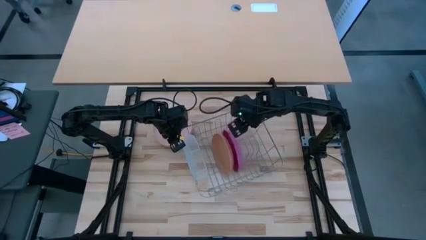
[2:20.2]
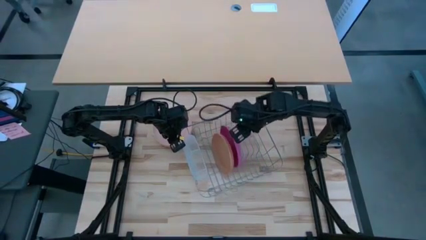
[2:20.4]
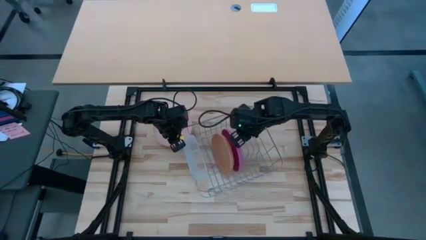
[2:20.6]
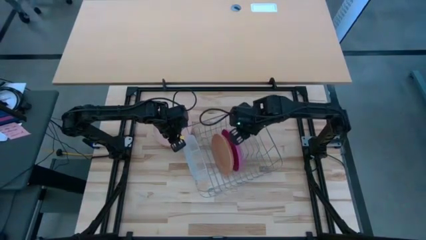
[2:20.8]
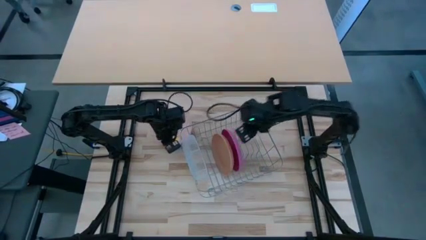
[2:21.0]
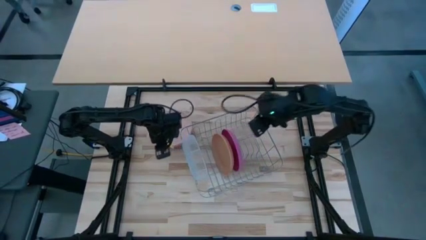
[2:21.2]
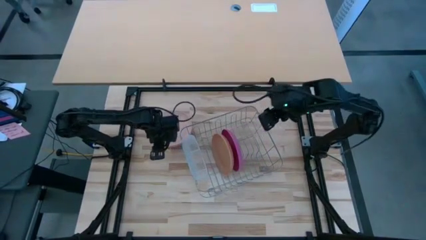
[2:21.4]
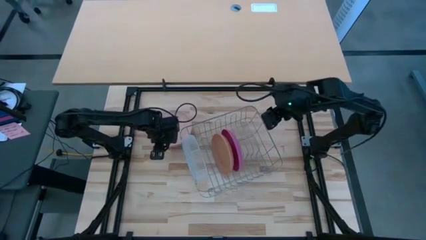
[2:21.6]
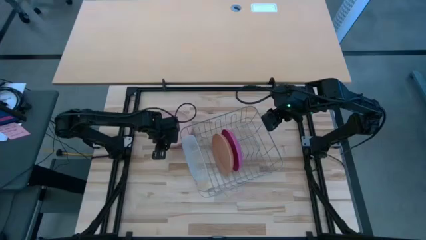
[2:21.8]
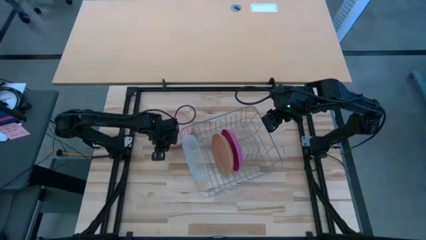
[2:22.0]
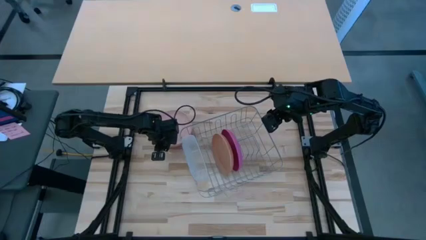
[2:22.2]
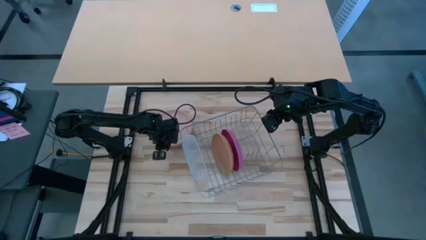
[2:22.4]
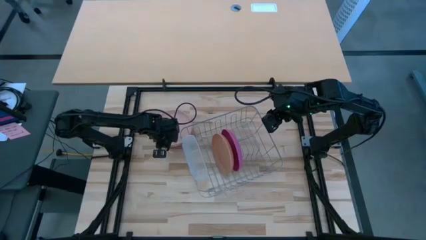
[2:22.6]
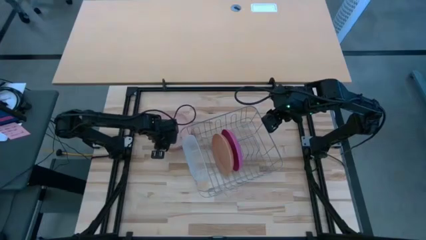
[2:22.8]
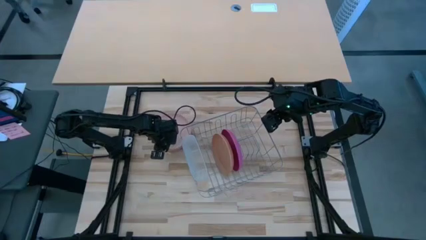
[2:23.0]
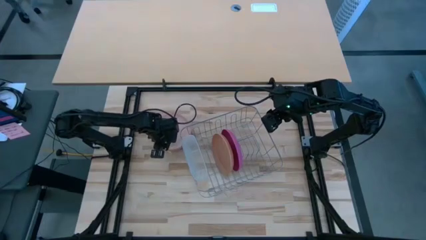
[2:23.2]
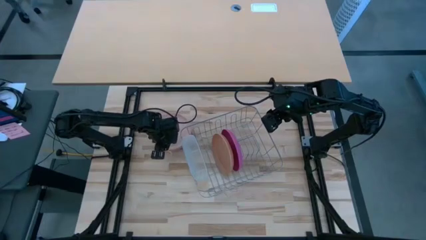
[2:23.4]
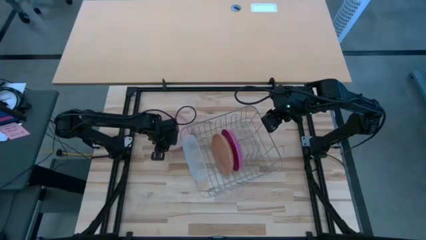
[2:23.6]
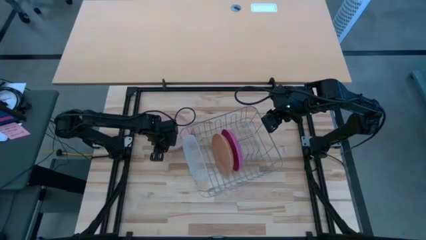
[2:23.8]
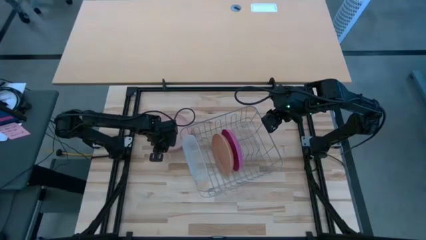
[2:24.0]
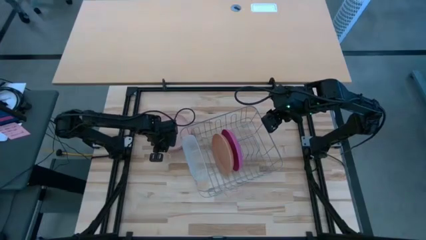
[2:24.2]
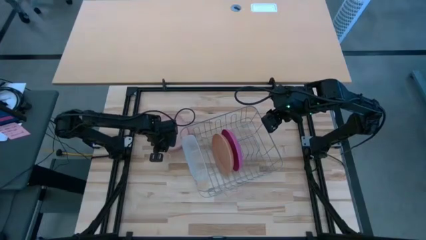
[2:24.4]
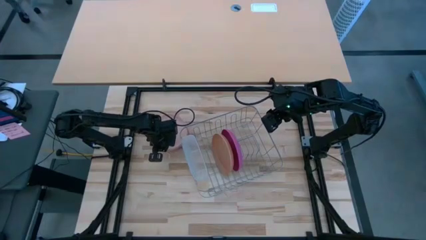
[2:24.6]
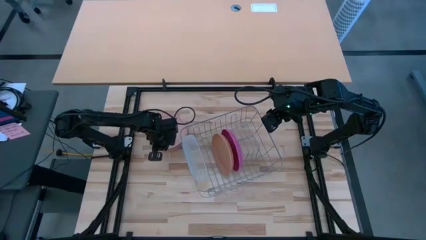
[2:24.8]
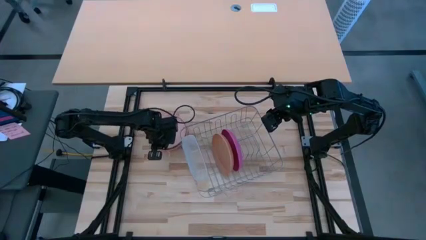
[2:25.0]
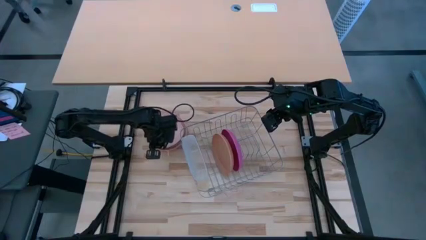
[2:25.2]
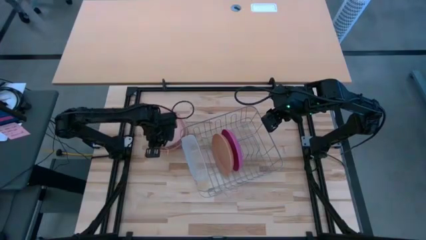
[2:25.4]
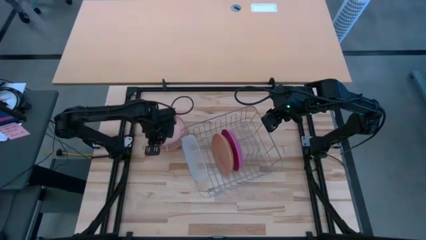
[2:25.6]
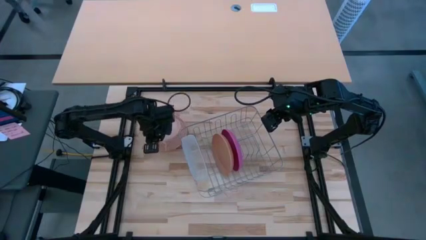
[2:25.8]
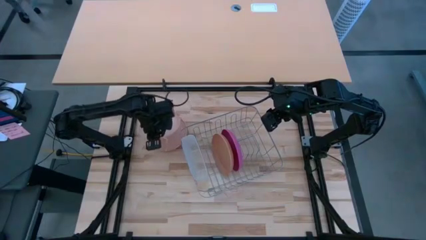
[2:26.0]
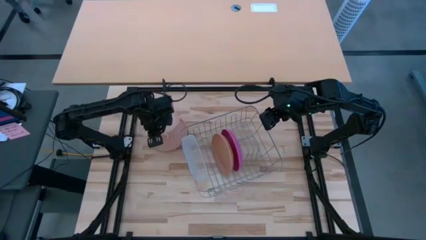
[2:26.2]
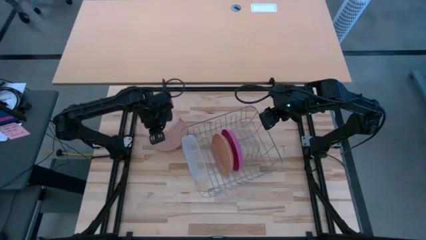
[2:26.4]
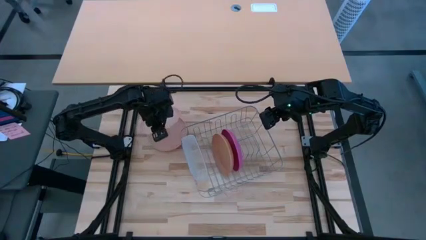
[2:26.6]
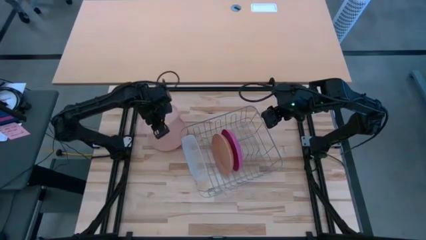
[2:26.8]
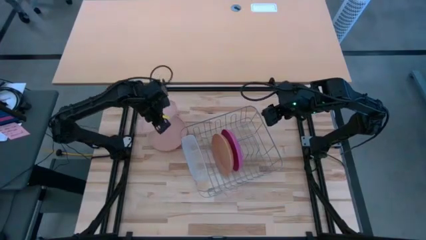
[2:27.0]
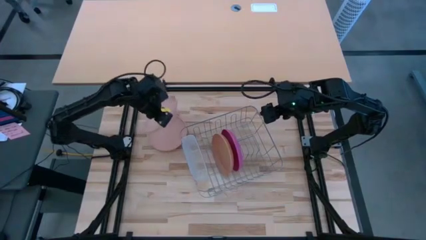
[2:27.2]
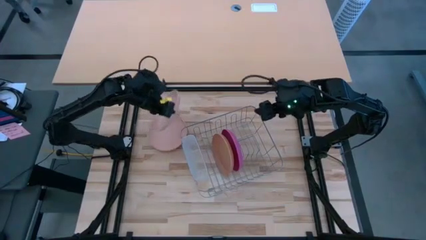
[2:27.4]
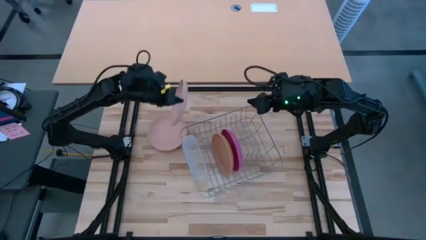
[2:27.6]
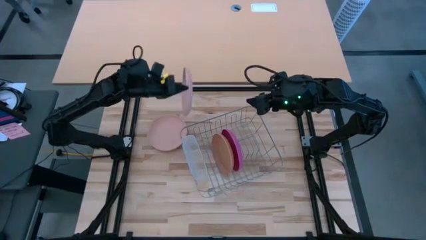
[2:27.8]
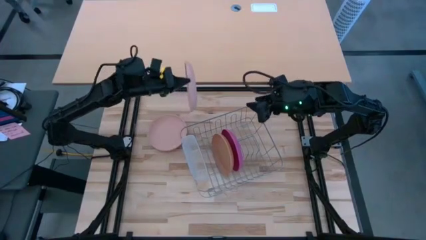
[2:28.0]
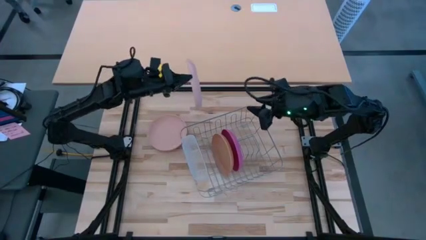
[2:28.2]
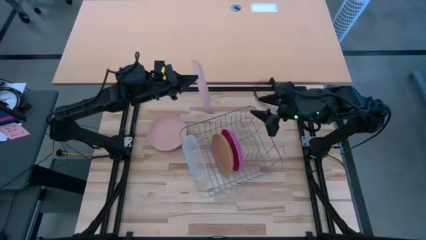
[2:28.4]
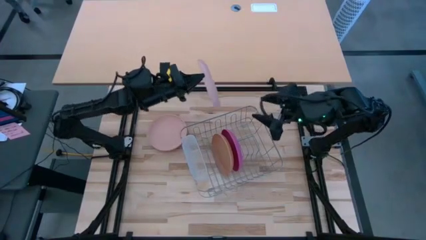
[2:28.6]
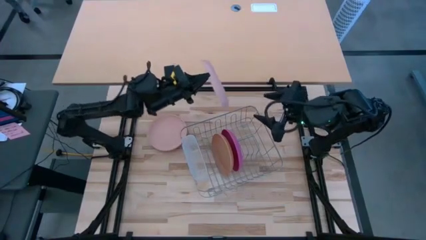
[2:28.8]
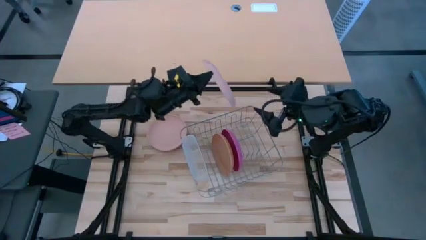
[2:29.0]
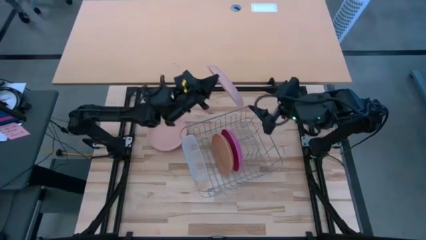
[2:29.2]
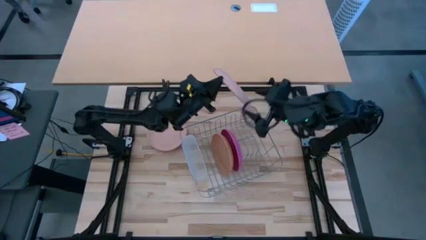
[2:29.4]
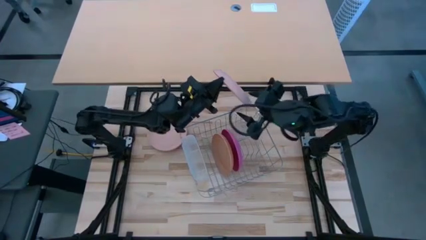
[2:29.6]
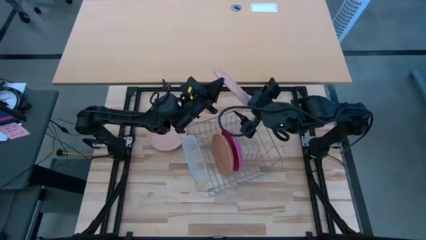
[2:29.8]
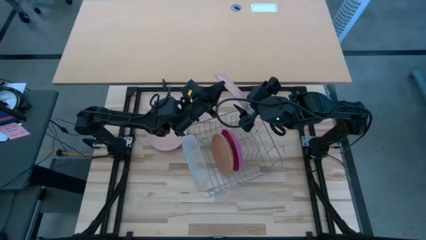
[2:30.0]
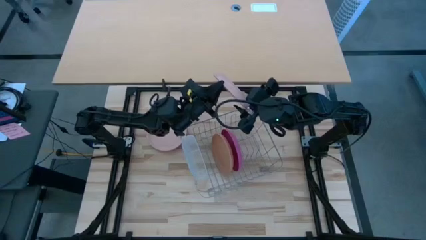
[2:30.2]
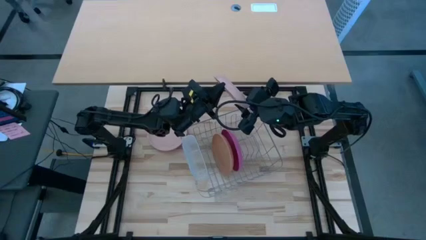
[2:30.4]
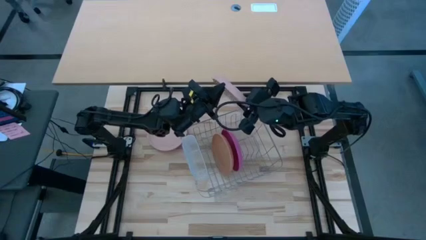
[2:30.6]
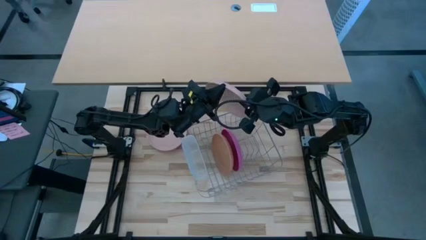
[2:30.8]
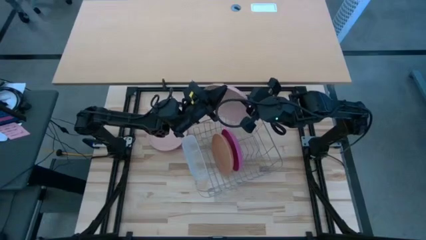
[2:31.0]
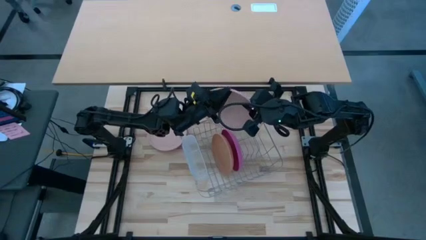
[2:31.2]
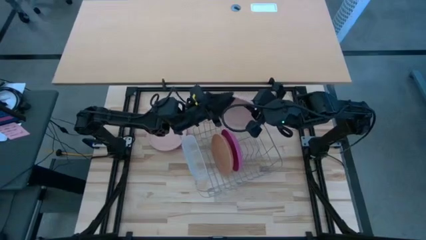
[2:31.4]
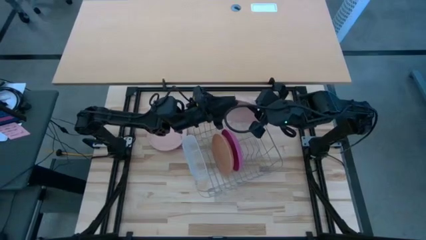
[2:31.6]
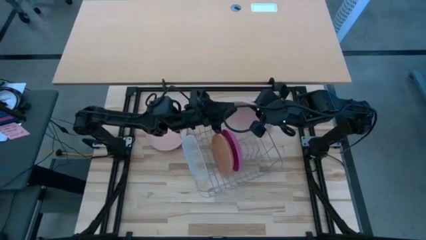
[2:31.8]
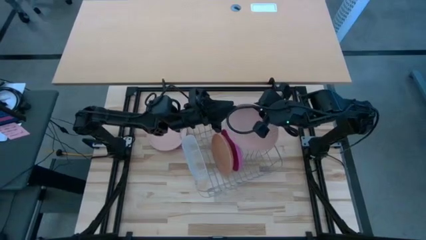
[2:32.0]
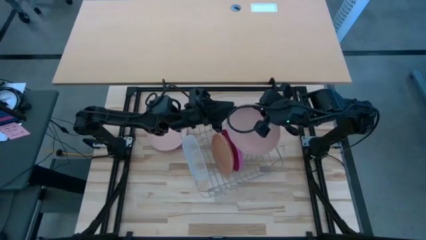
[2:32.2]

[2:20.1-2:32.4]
Task: Sort dishes
Put the top light orange plate in the dish rack

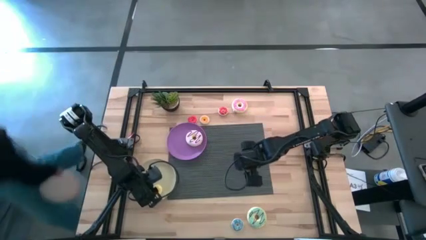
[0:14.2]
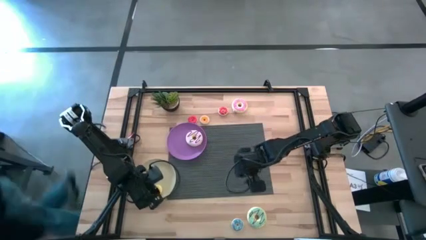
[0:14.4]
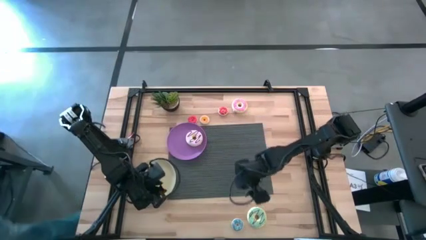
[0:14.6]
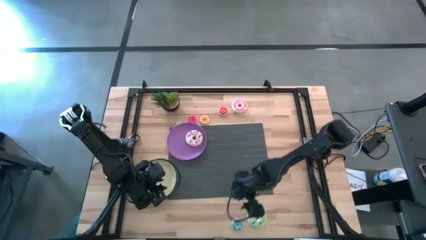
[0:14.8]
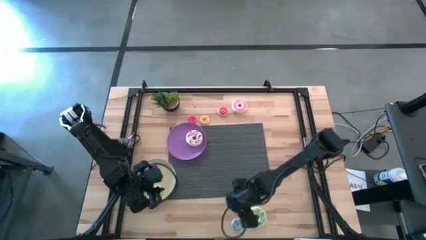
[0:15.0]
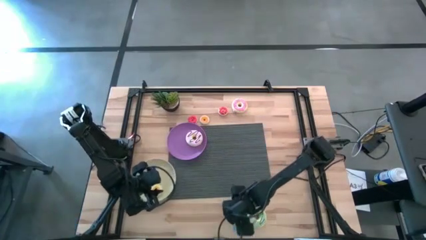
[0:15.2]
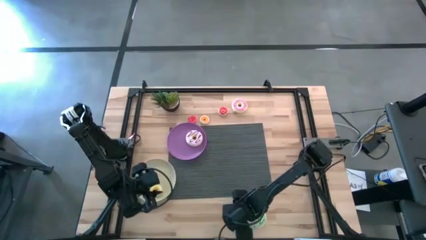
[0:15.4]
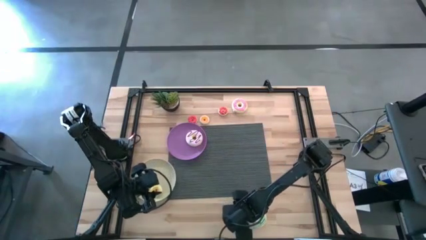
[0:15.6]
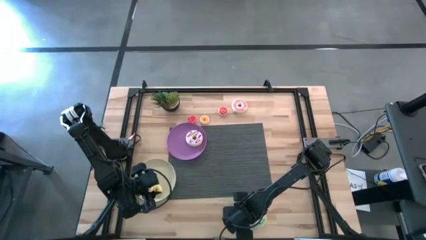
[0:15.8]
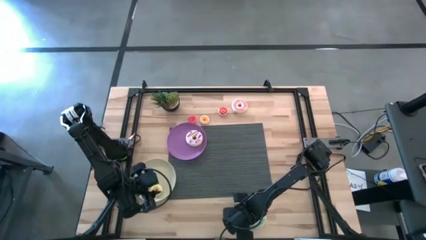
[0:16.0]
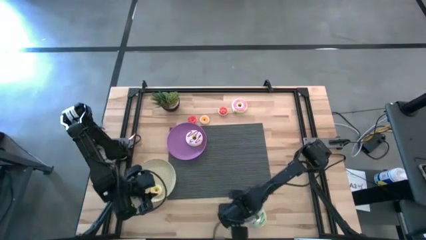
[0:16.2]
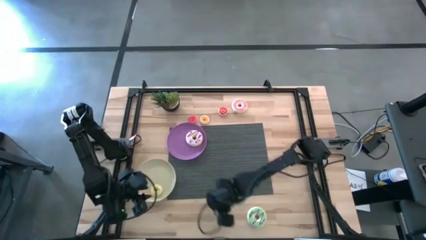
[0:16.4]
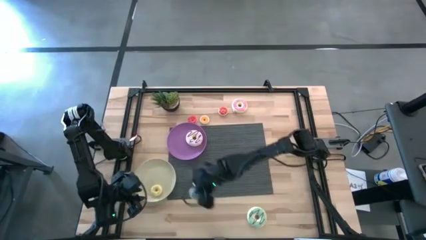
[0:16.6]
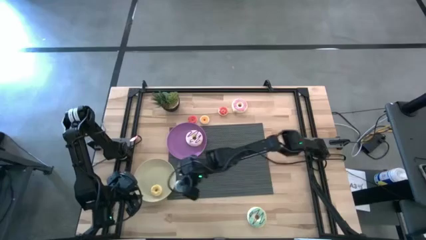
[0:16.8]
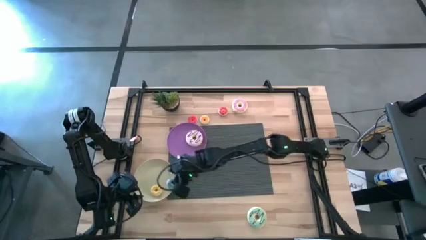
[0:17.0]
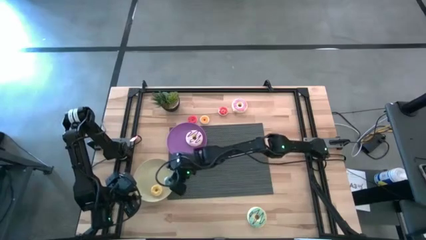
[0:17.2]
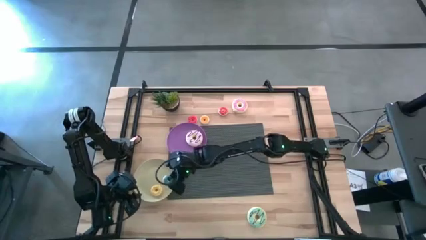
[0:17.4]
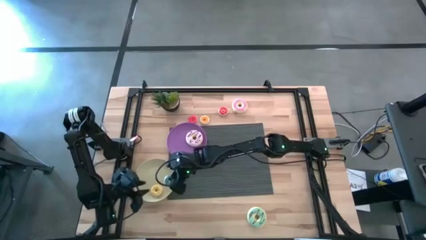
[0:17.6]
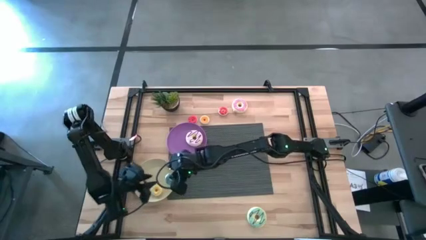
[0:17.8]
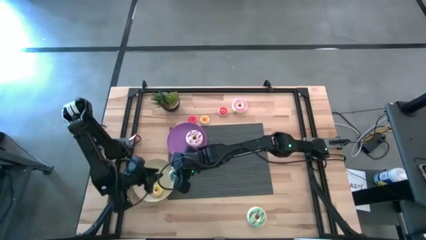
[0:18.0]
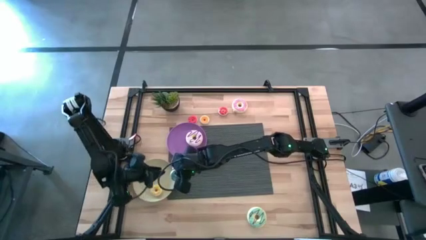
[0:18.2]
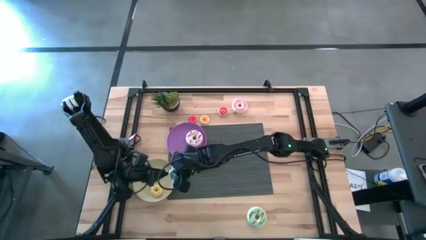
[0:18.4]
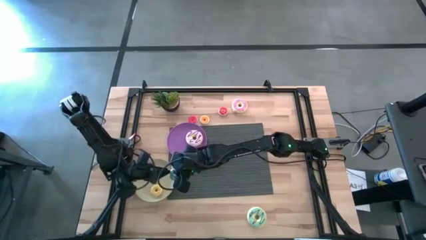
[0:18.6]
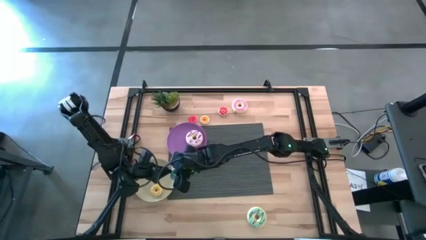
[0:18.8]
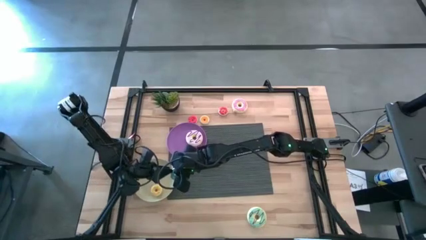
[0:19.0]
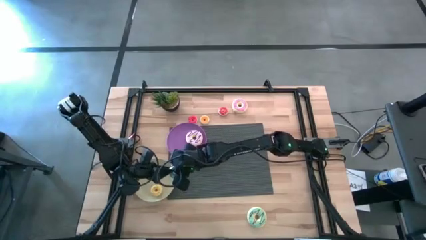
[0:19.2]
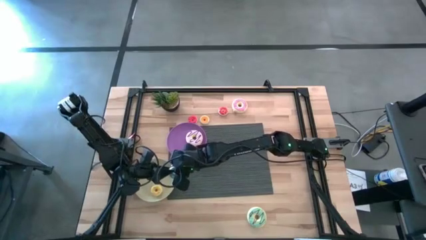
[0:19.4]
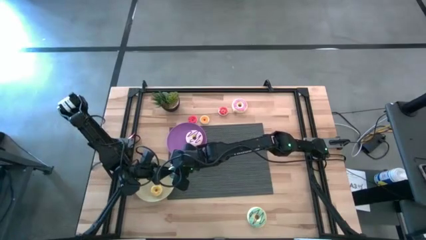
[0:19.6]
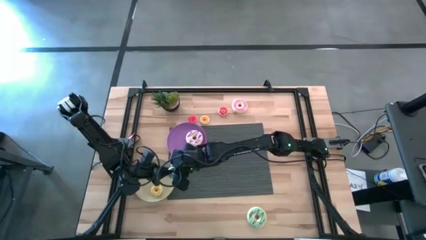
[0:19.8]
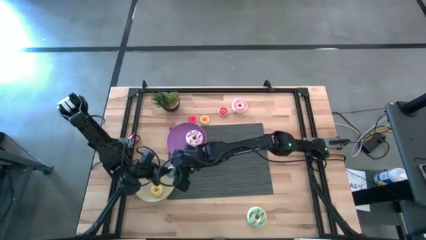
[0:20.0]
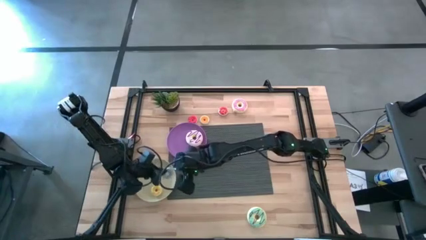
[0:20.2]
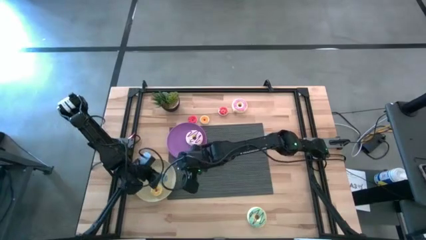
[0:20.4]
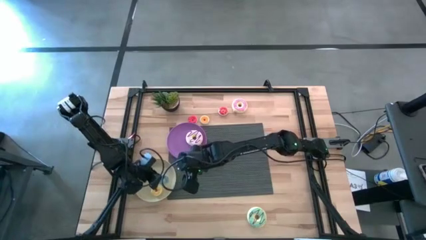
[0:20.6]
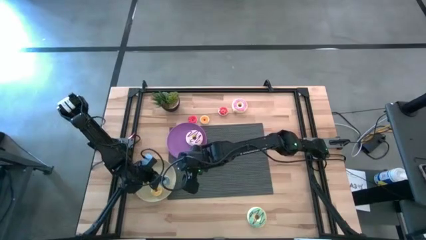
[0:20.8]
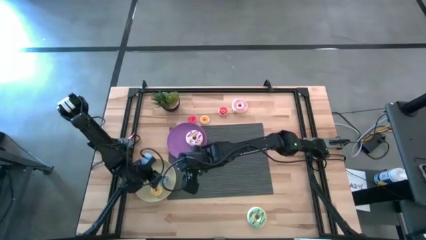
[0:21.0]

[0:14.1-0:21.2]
Task: Pick & Place donuts
Put the small blue donut on the gray plate
